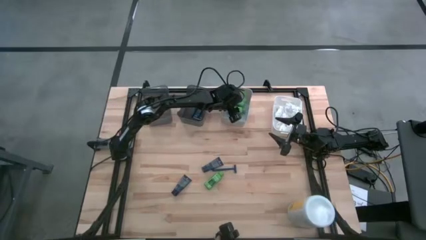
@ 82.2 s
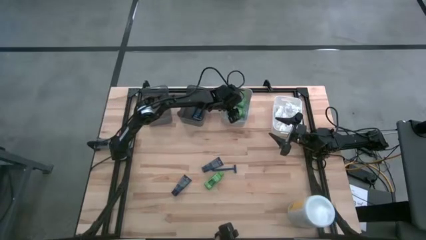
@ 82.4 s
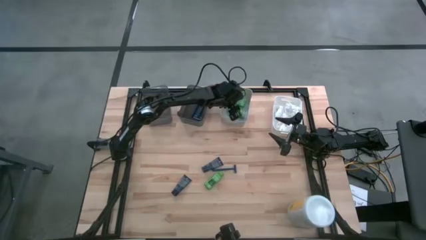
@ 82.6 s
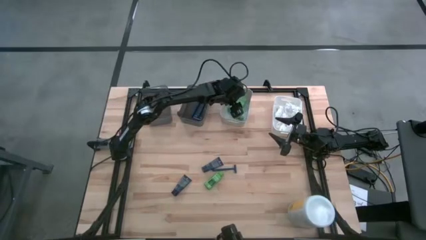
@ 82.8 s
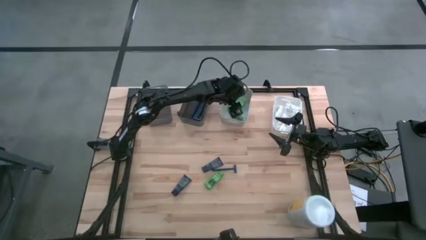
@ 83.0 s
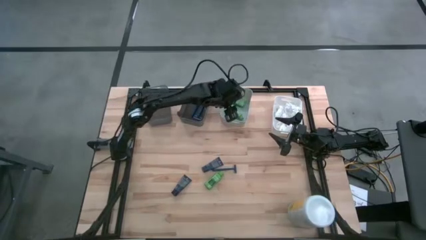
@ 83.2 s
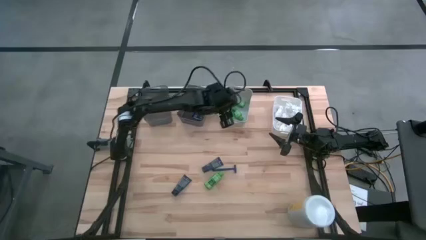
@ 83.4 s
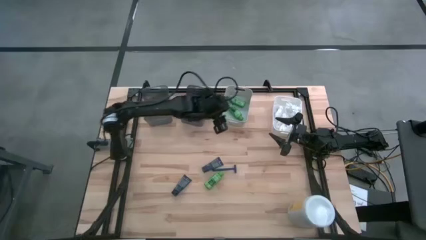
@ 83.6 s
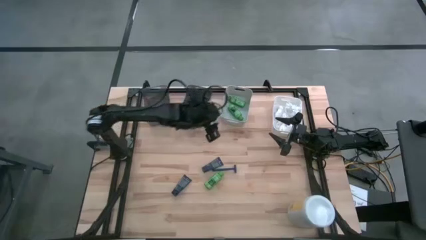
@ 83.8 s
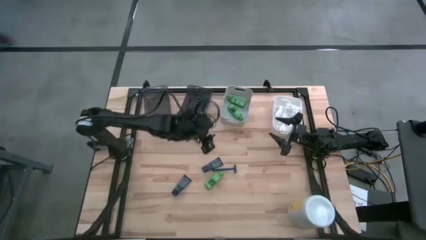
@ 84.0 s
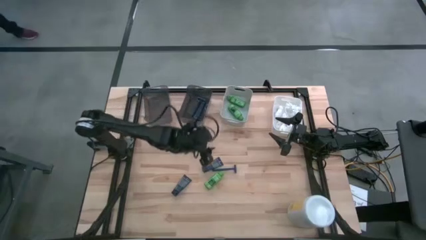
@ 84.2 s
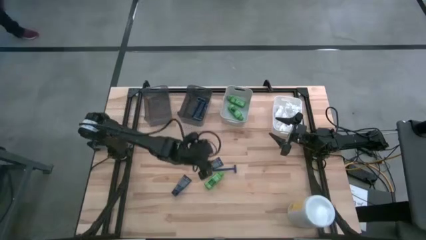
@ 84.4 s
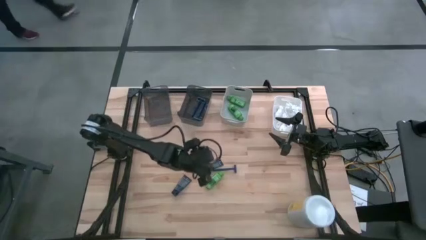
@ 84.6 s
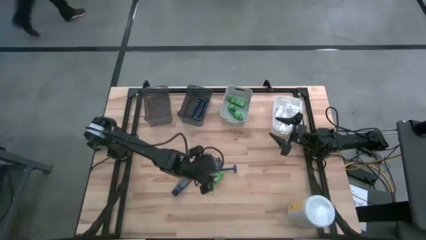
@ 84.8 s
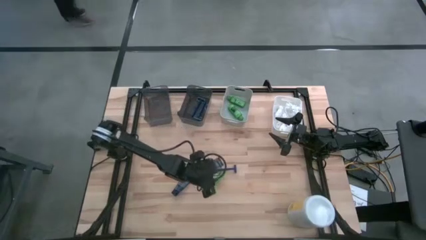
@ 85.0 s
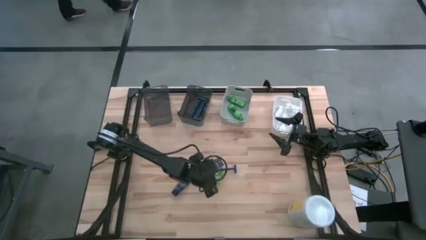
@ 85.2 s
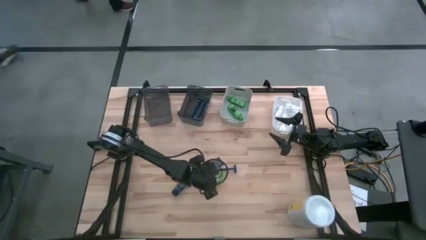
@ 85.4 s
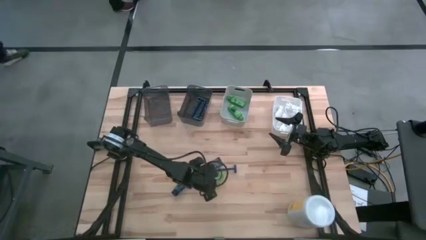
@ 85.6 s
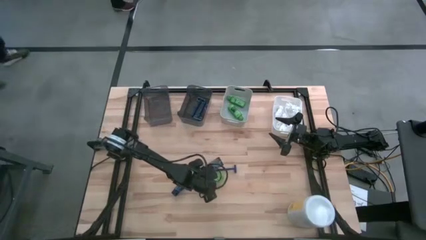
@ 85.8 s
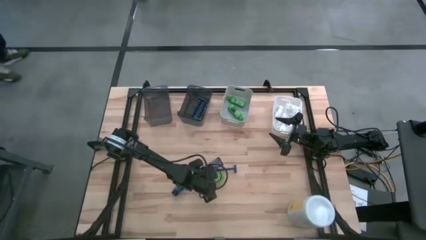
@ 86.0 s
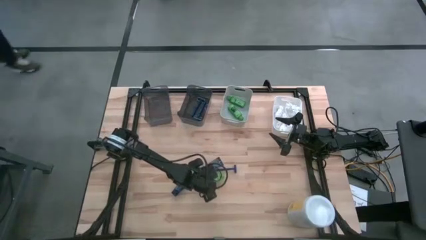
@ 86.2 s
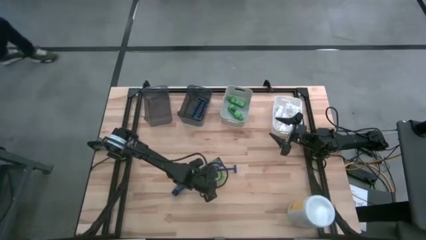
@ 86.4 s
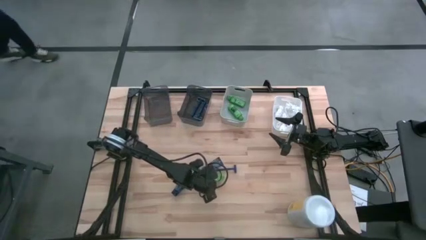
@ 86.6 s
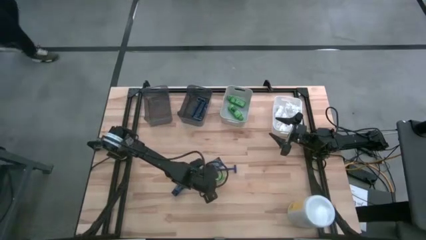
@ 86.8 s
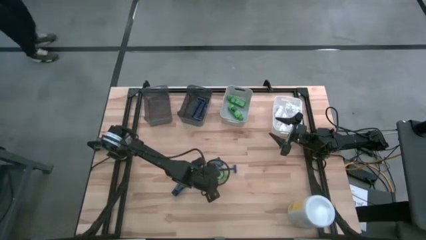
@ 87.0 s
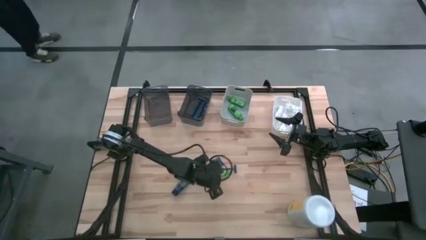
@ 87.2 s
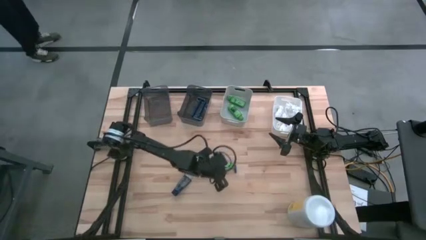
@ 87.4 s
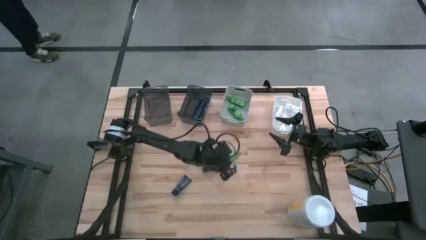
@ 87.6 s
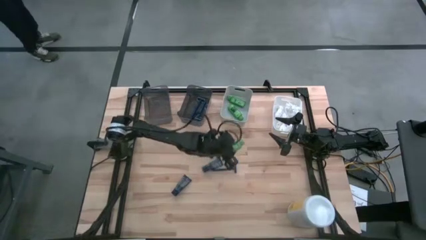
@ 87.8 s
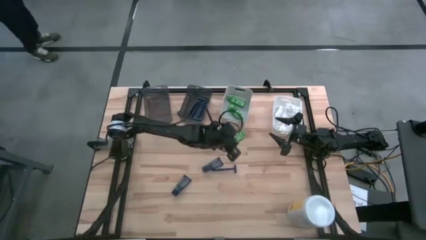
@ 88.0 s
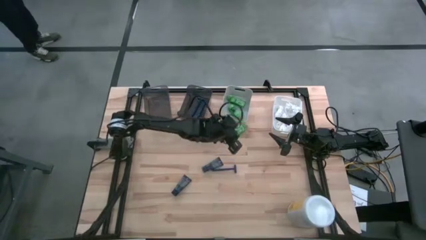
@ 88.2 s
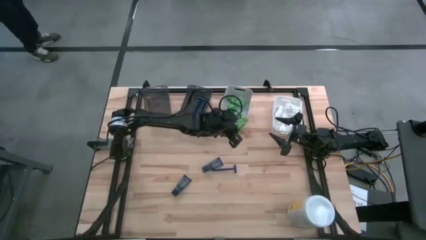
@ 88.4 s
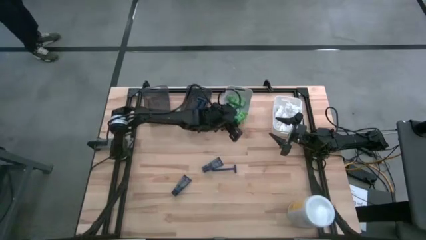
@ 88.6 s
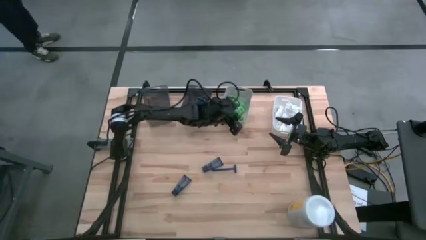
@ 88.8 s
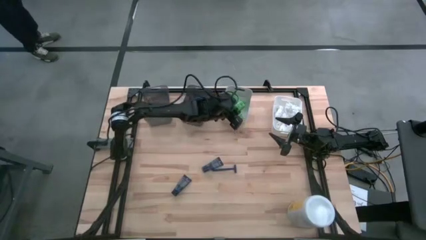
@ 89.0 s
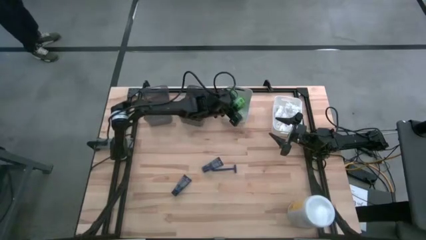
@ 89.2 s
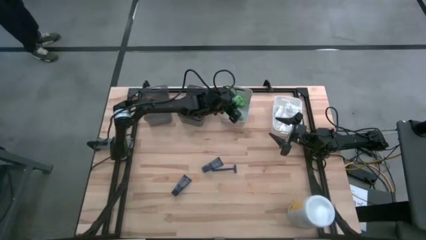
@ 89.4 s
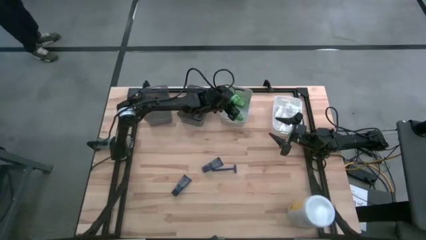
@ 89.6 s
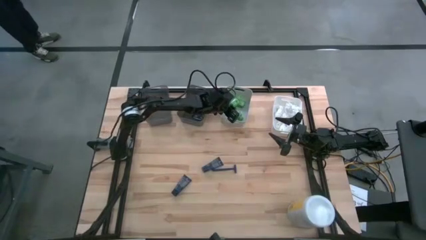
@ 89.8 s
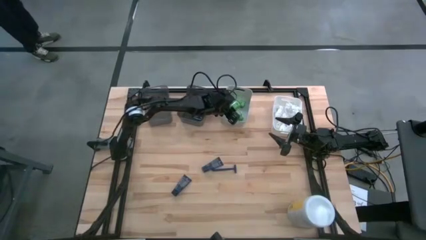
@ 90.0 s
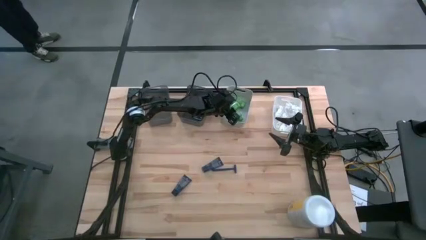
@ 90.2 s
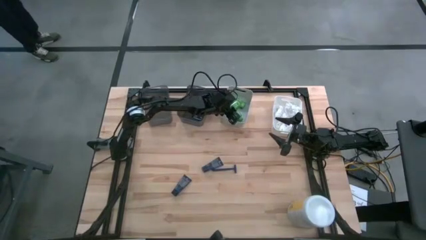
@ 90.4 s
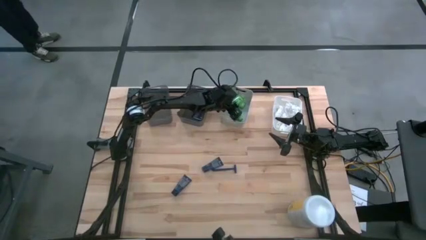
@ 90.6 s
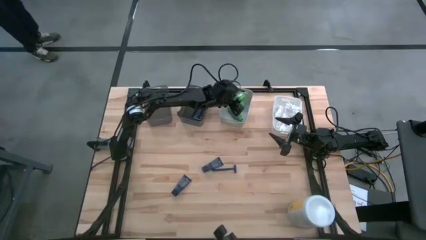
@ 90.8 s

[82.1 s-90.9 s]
Task: Pick & Place Travel size toiletries
Put the green shampoo into the gray bin

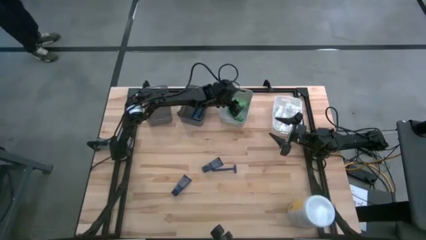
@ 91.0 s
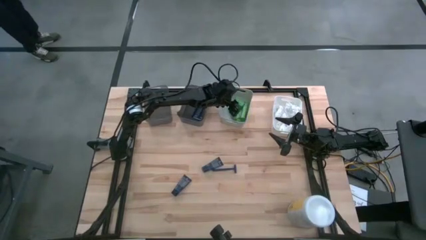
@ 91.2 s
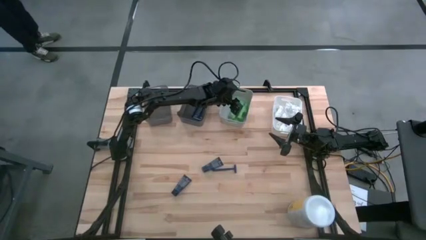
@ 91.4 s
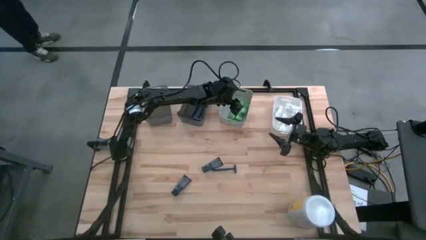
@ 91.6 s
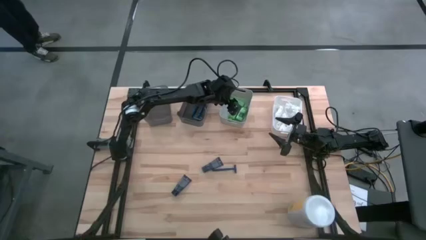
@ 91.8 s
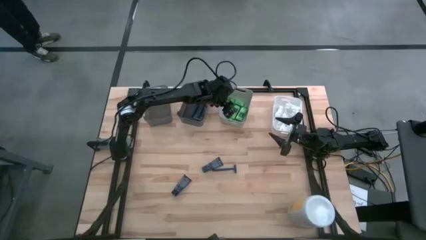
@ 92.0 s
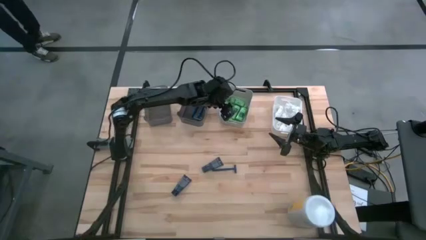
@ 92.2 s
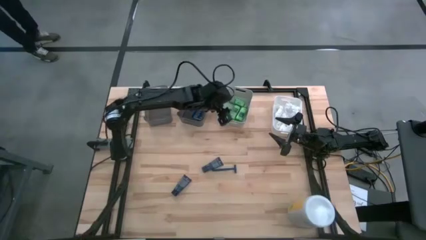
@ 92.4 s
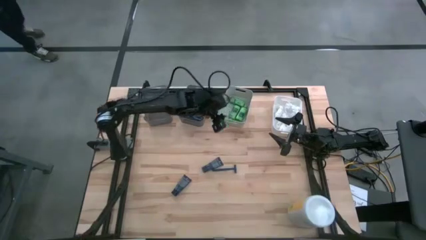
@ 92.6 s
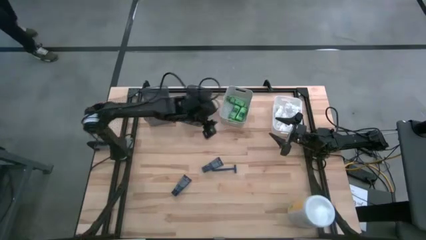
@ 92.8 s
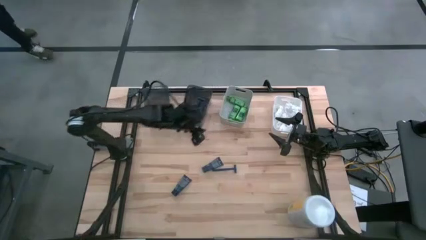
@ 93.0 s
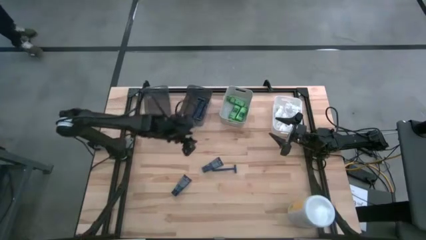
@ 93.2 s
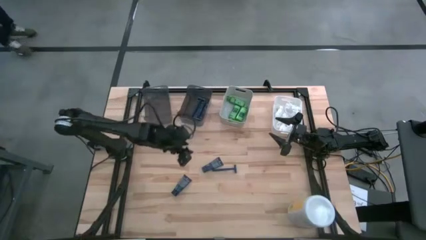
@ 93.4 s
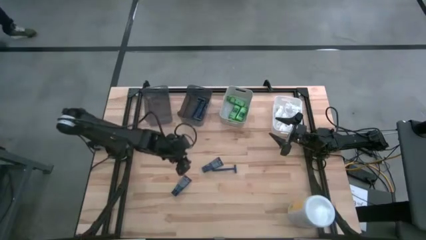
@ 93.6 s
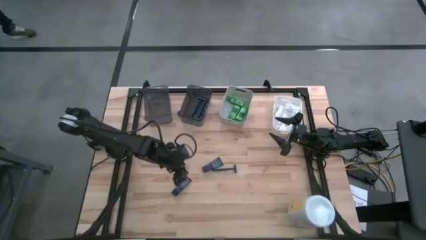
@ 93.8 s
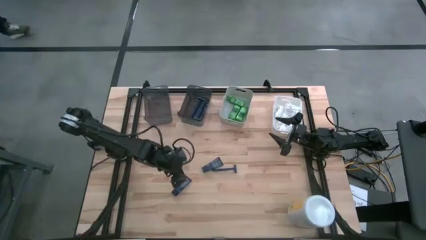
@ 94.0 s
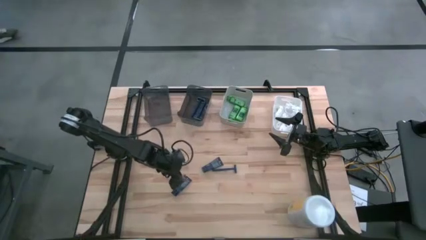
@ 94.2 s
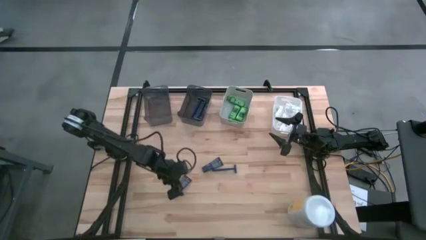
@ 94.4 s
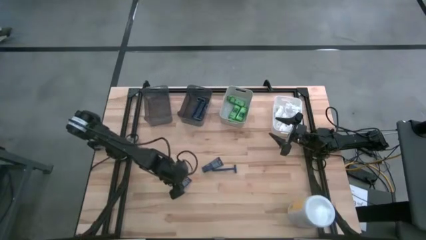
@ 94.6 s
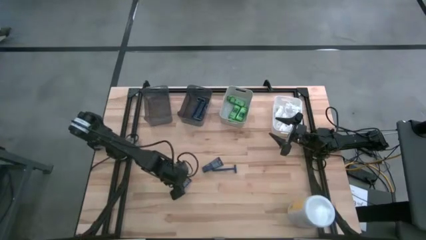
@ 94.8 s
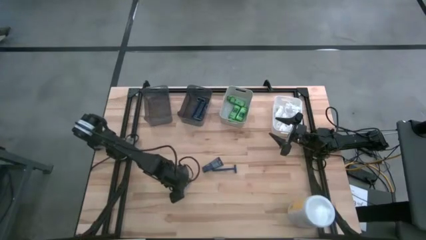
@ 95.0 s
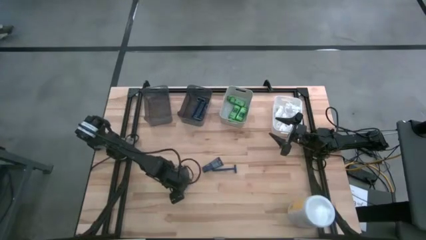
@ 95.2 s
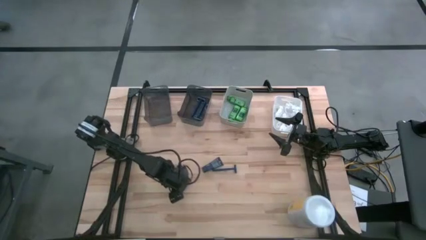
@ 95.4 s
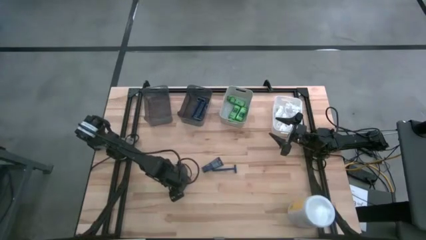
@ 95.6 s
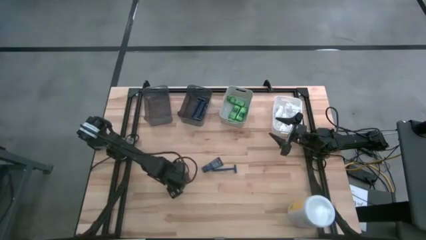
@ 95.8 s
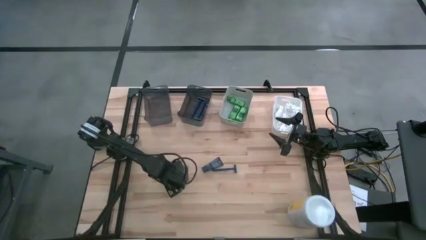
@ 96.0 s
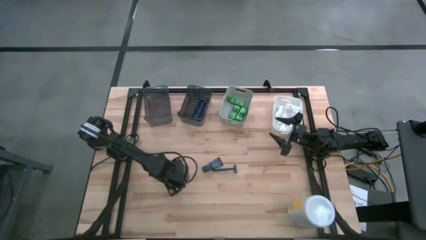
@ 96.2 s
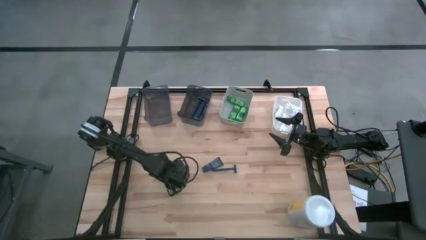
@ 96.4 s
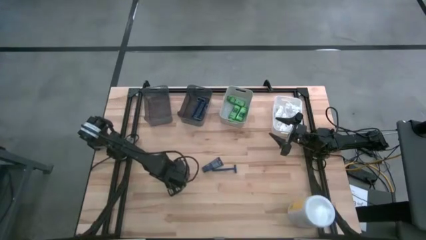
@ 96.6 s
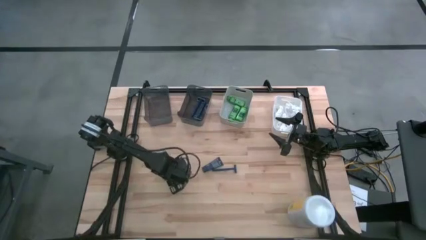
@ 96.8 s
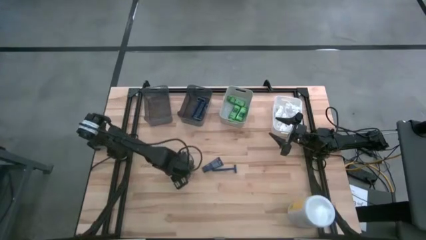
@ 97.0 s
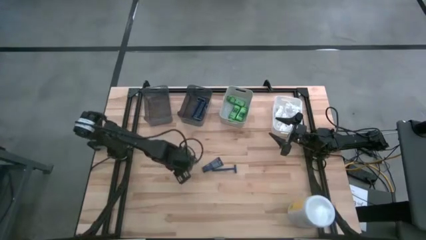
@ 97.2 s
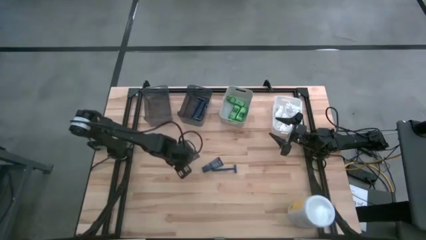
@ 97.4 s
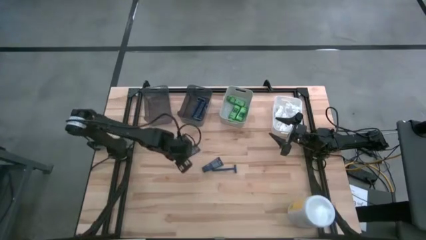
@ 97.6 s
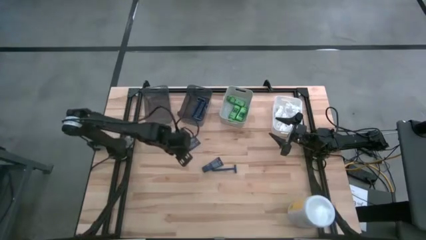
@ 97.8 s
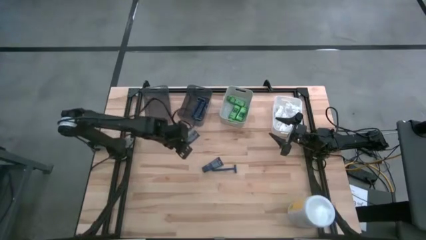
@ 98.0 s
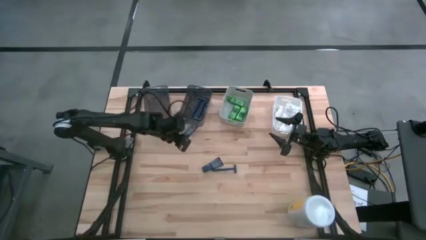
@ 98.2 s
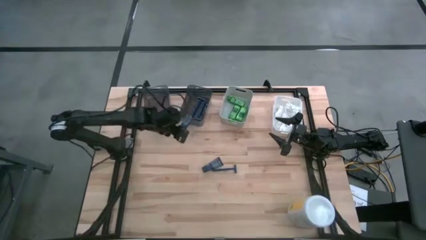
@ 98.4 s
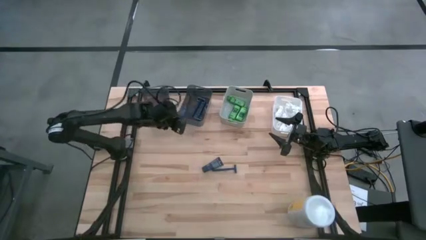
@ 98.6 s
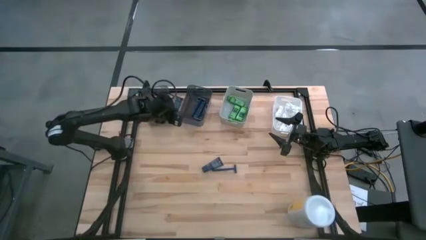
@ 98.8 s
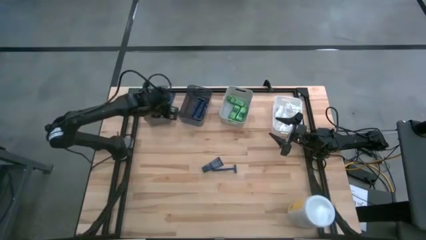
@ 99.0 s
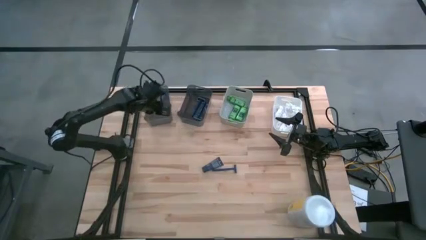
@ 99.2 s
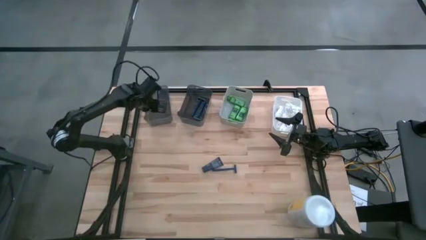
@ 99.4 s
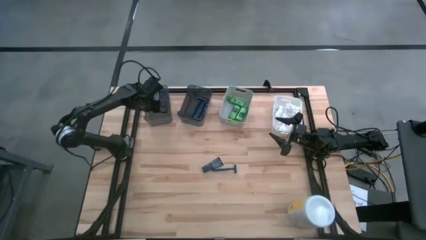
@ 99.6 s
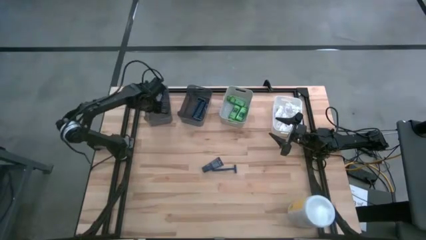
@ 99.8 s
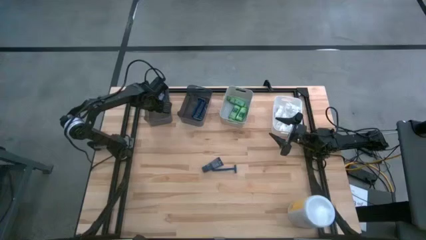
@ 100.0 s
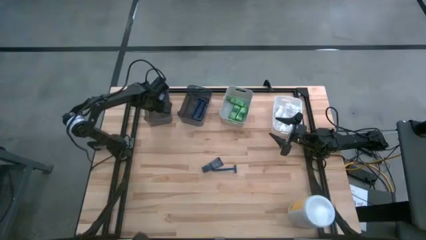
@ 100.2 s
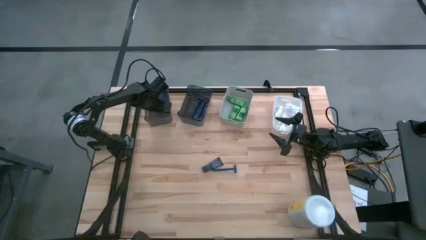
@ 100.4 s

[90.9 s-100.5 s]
Put the blue shave cream into the left black bin
